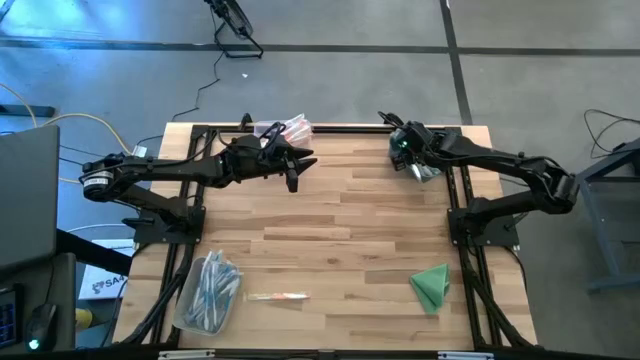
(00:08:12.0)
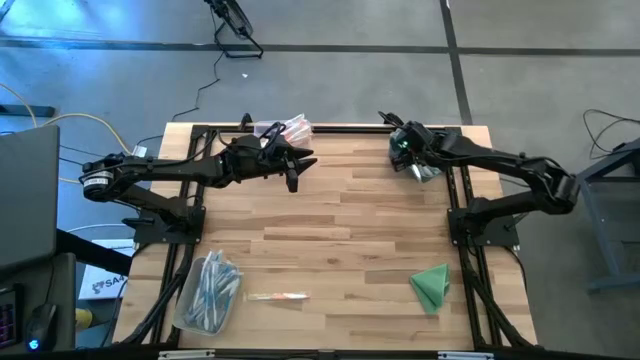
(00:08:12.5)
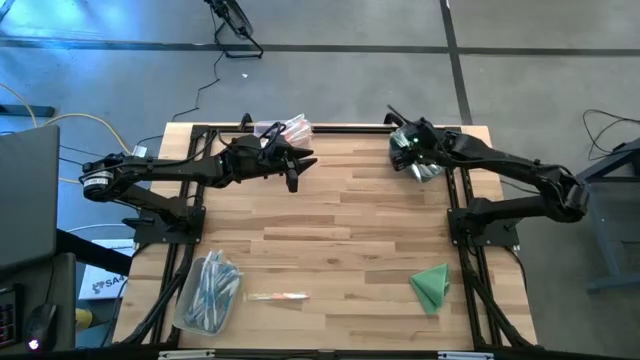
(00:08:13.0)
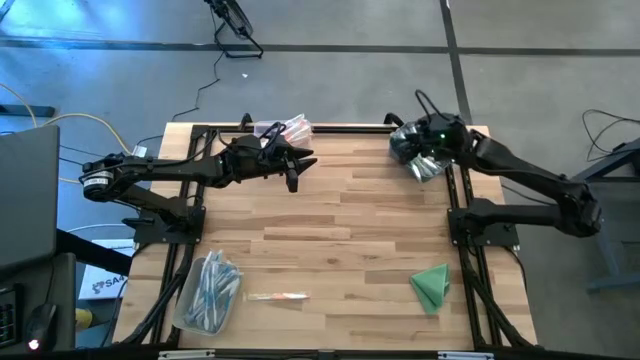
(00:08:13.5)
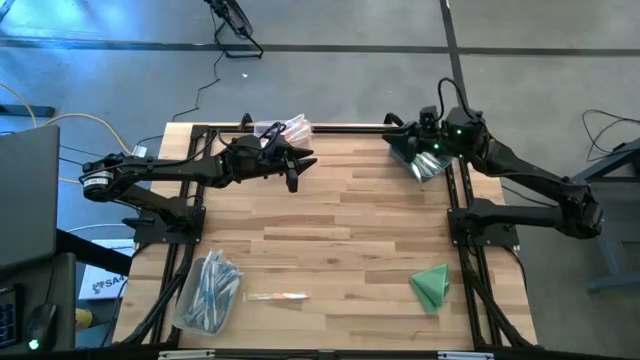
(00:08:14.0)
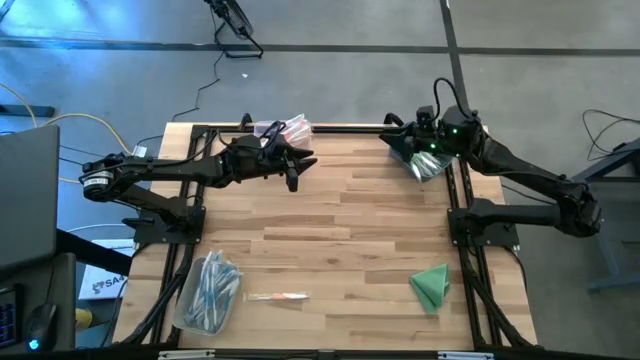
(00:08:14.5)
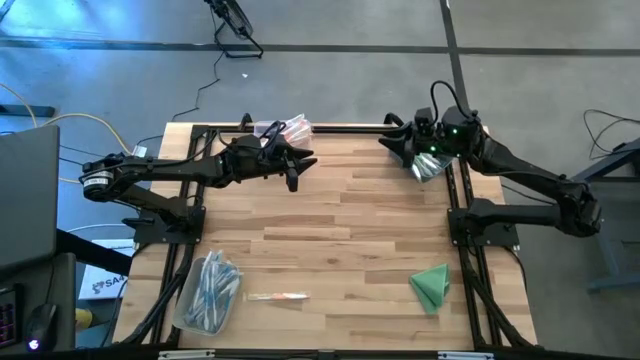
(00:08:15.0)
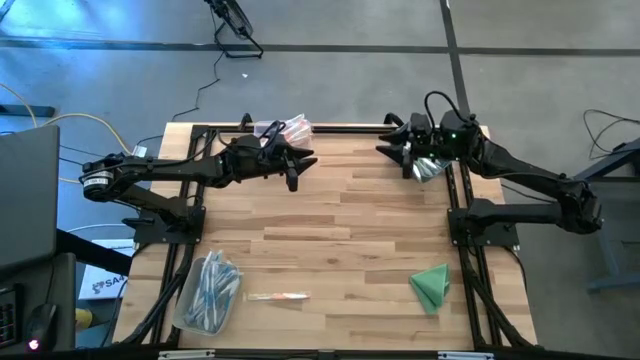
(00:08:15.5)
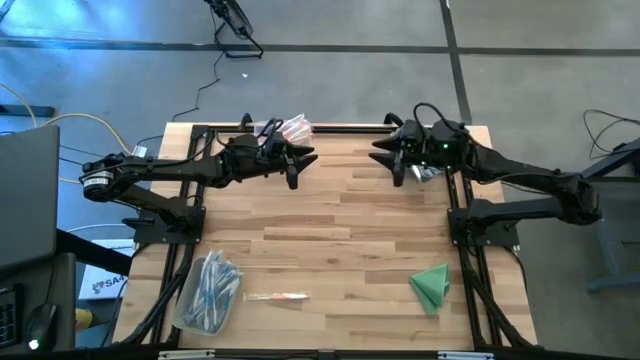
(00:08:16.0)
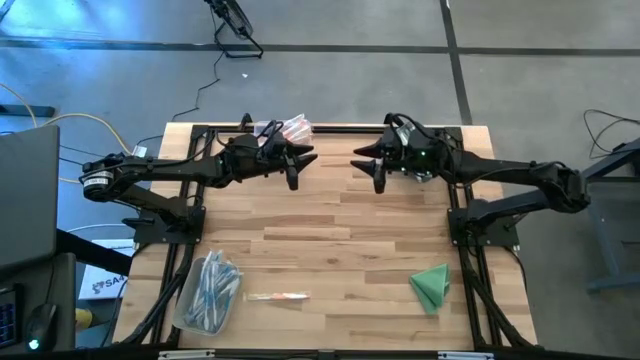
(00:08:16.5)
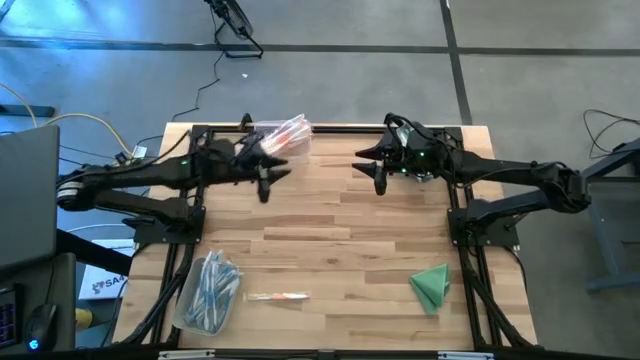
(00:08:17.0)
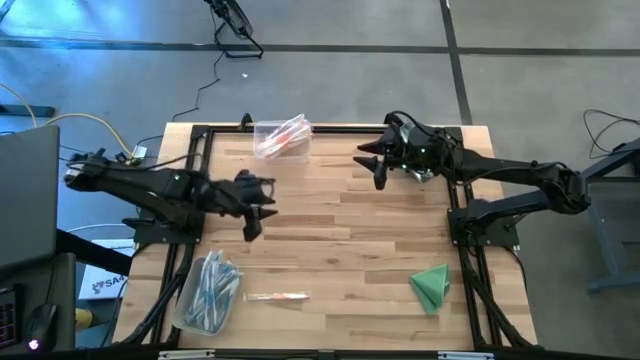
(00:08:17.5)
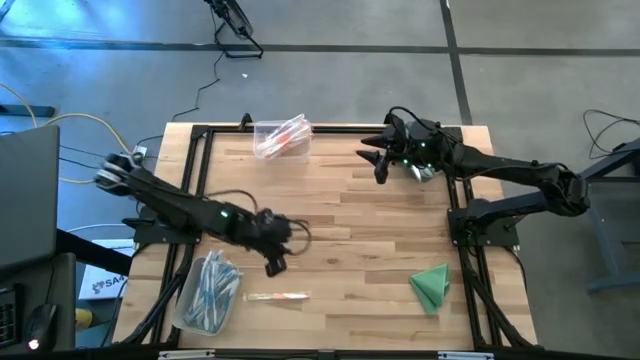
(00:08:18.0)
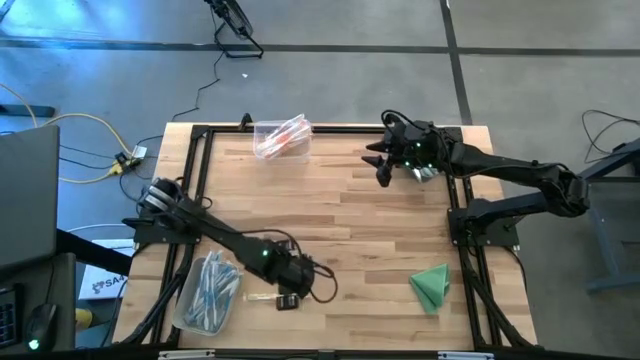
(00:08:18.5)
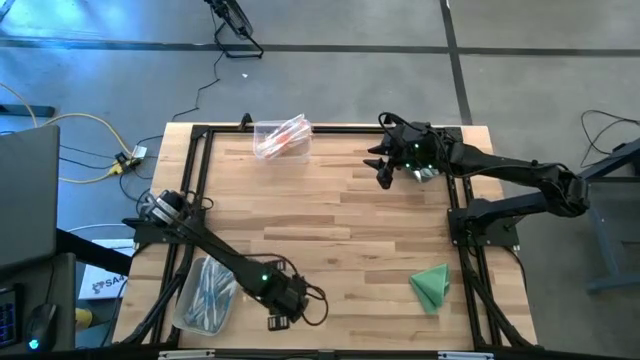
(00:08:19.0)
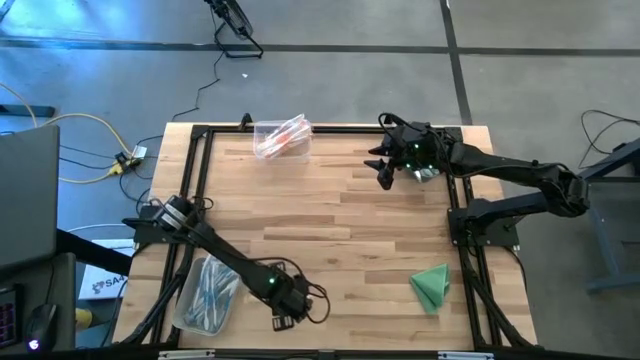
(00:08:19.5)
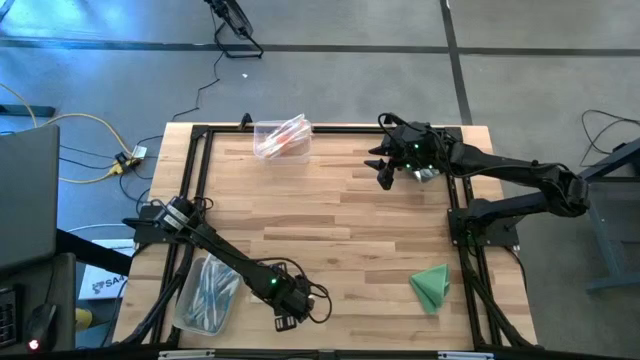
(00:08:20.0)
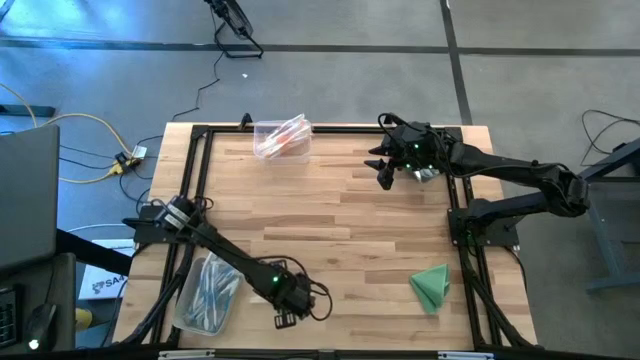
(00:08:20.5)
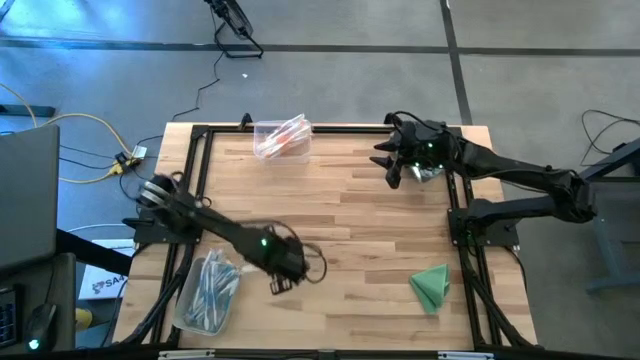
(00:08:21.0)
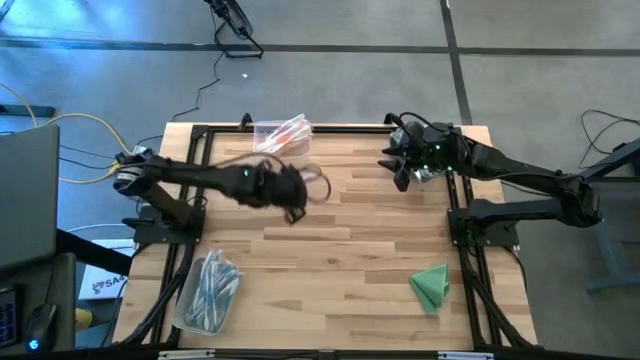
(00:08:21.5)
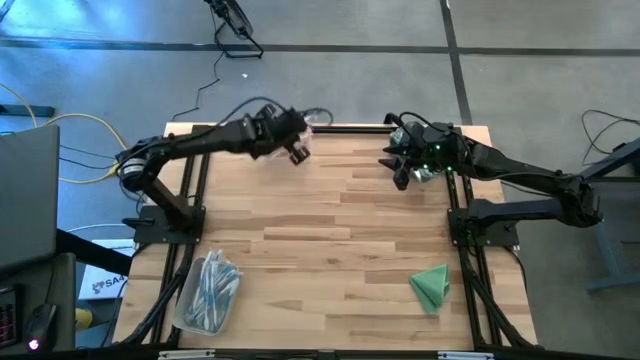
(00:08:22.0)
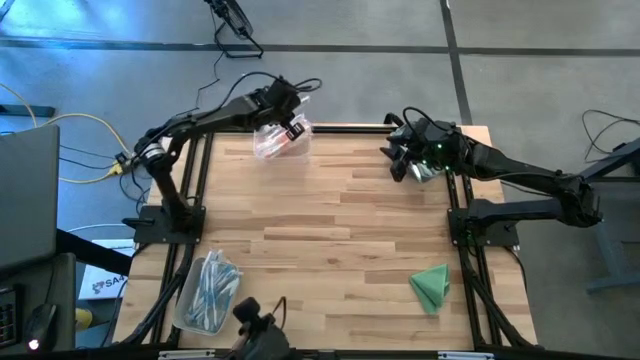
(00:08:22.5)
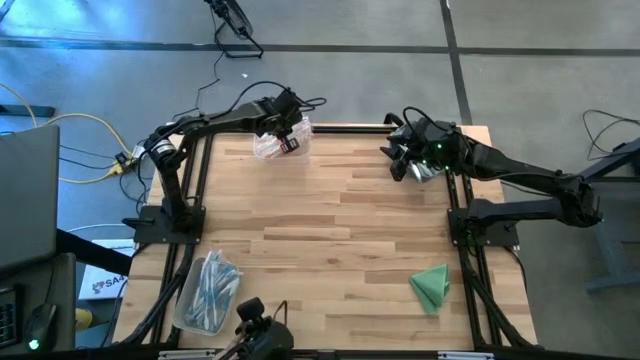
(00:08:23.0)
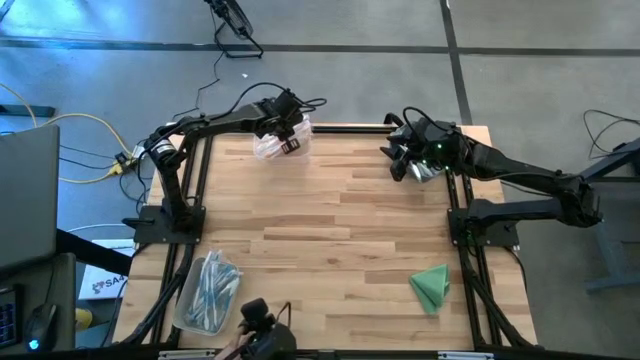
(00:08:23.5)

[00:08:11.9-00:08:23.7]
Task: Pick & Place Toothbrushes
Put the orange toothbrush into the transparent bin
